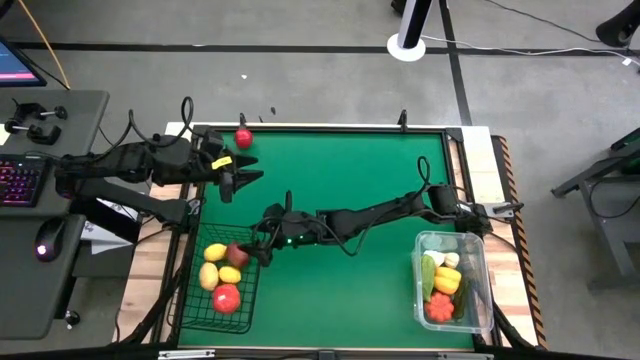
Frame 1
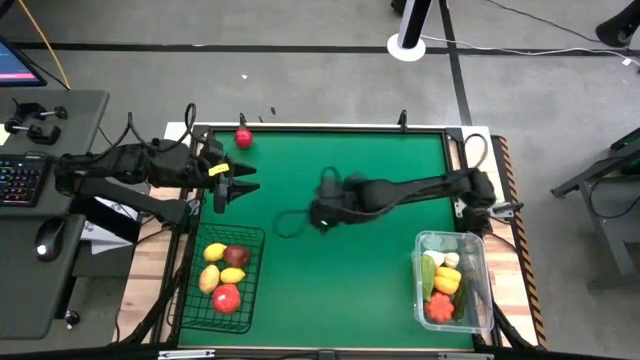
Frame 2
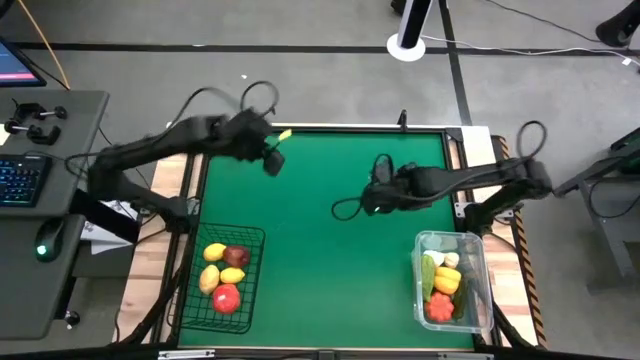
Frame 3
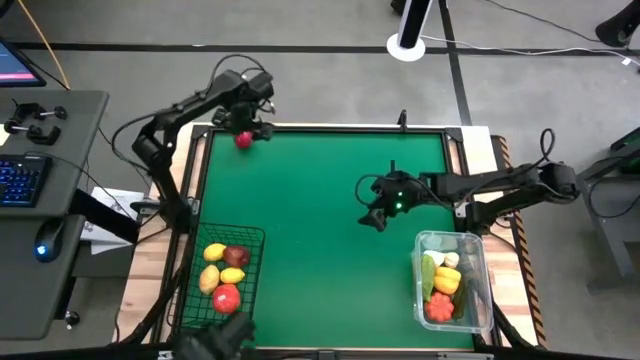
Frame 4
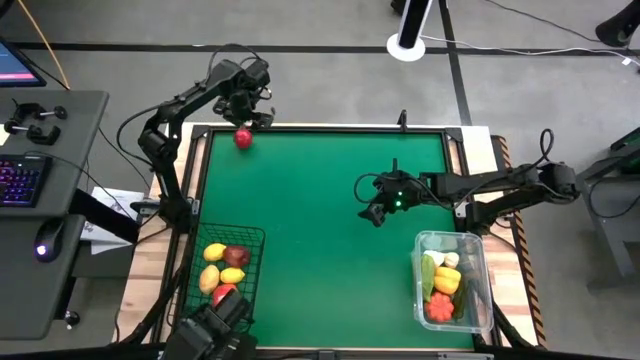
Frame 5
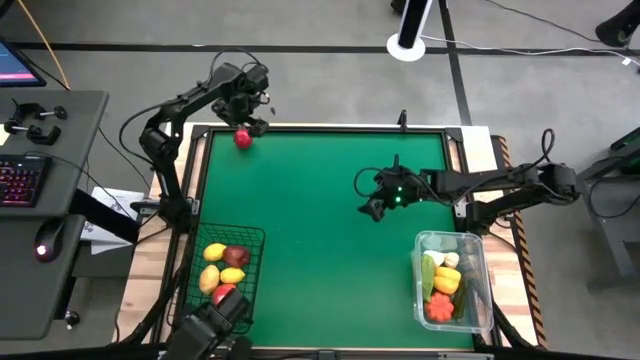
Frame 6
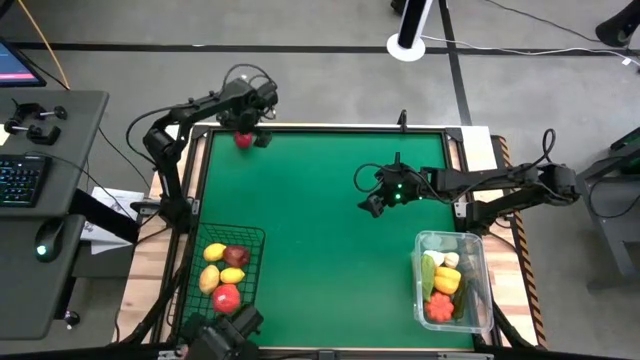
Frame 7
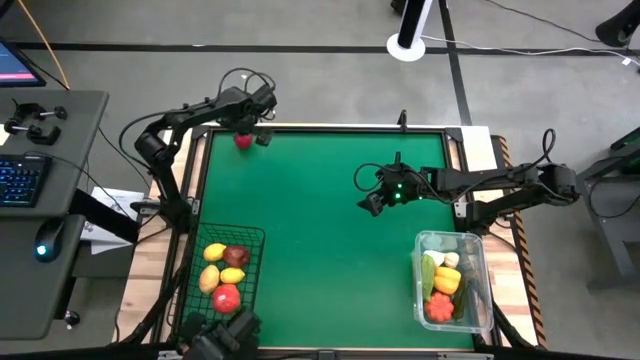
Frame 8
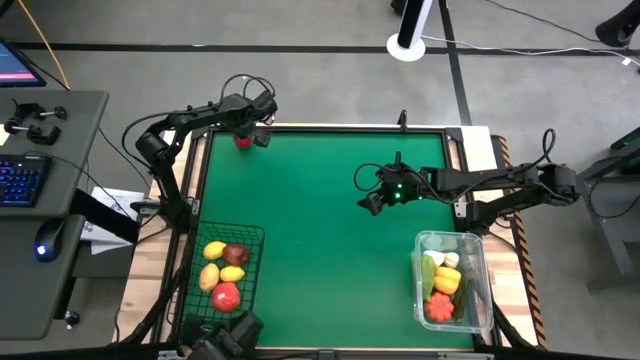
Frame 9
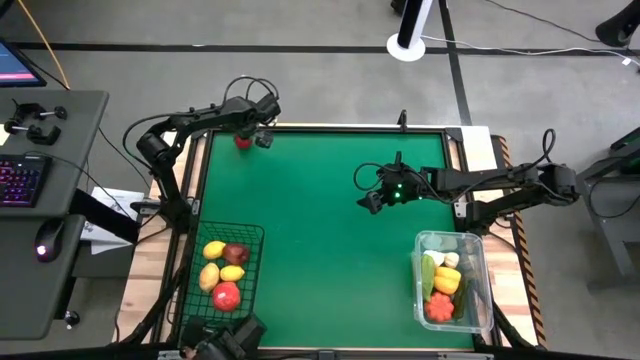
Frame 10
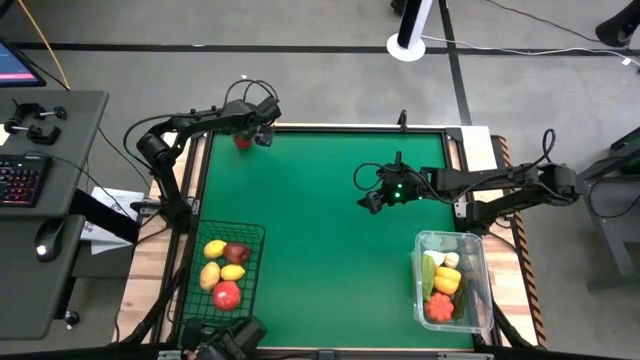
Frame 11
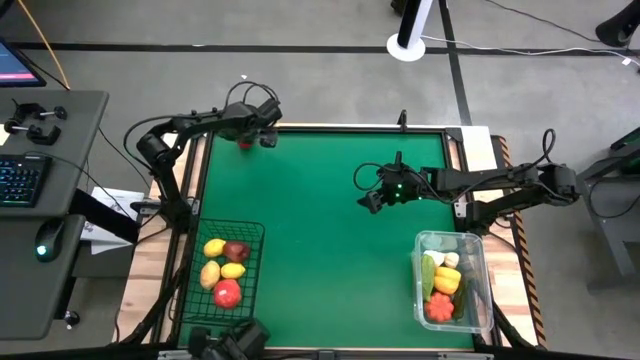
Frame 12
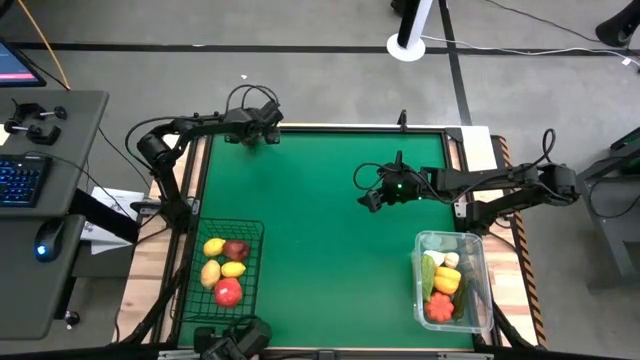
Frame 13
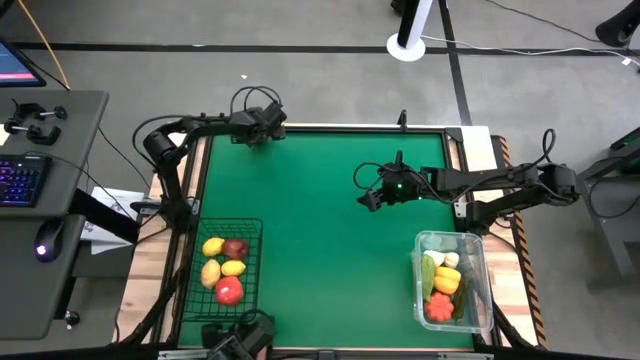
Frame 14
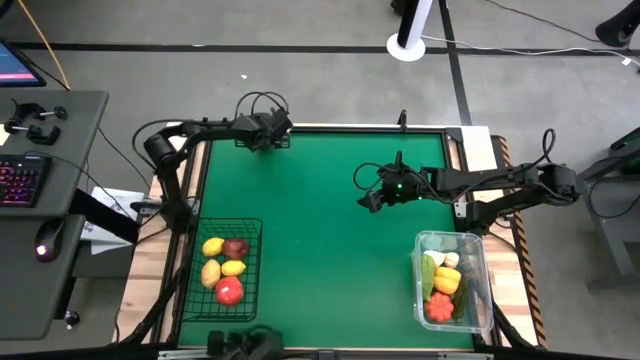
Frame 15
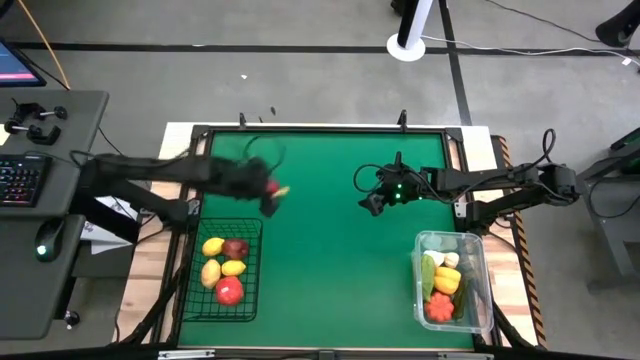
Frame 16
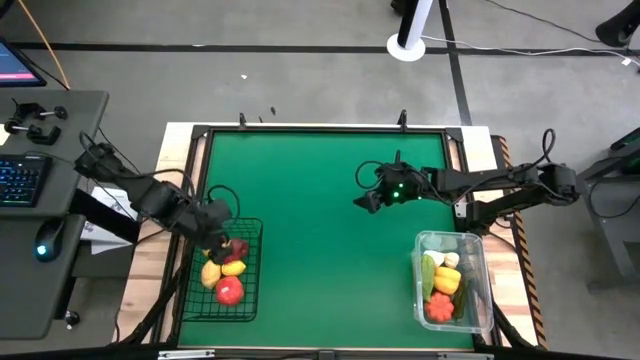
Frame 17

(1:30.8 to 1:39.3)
Task: Sort produce into baskets
Put the red tomato into the black wire basket

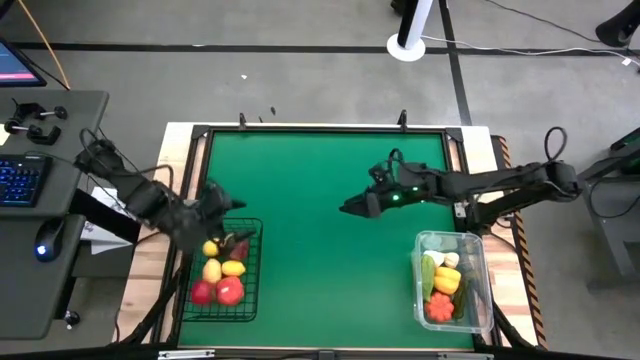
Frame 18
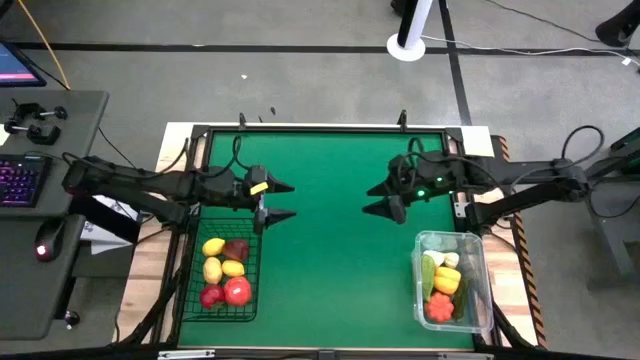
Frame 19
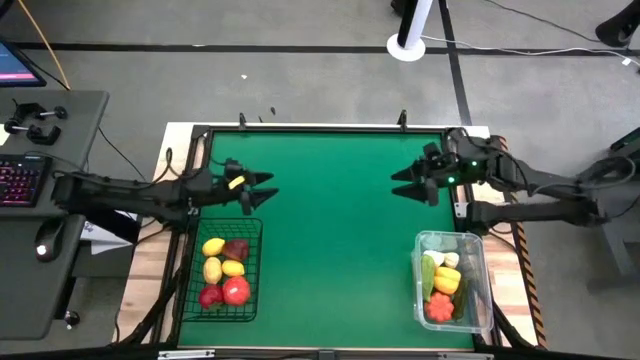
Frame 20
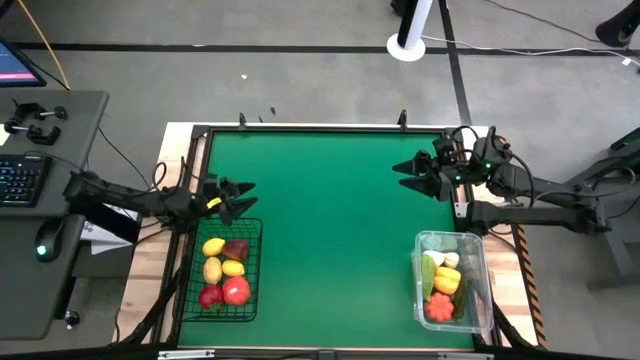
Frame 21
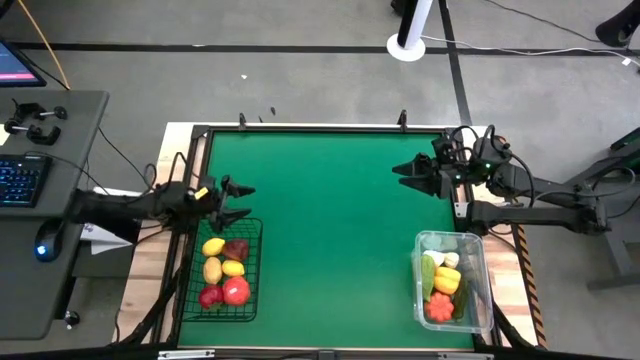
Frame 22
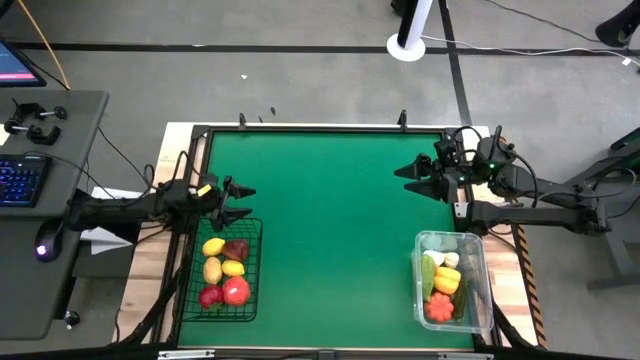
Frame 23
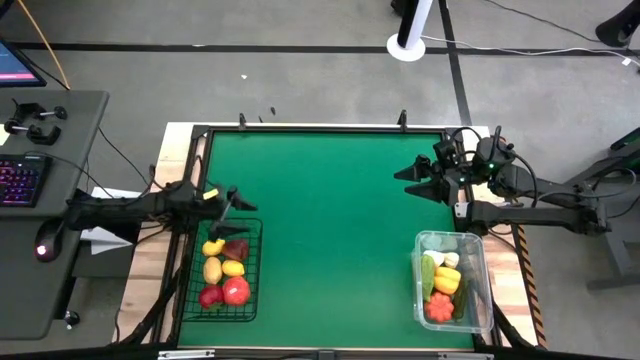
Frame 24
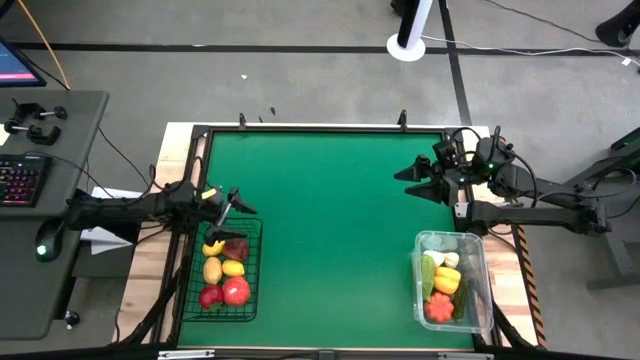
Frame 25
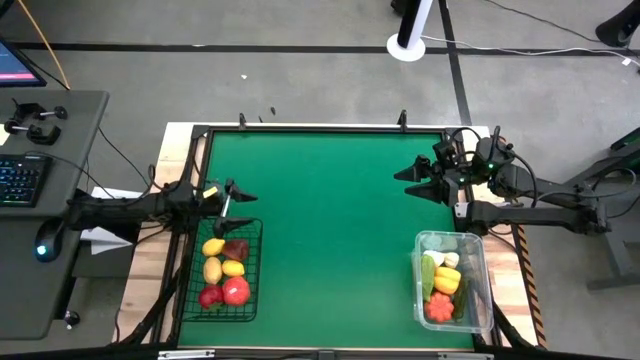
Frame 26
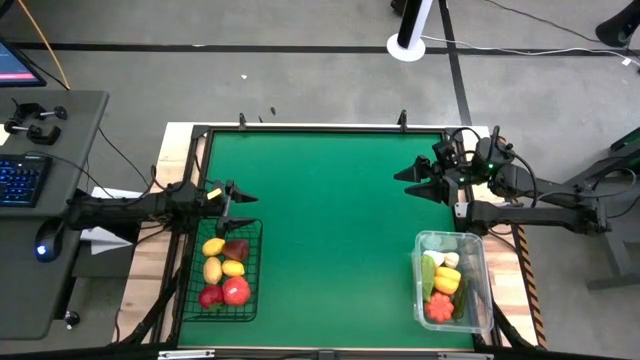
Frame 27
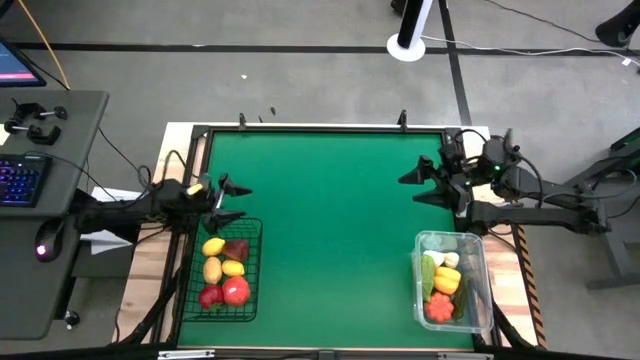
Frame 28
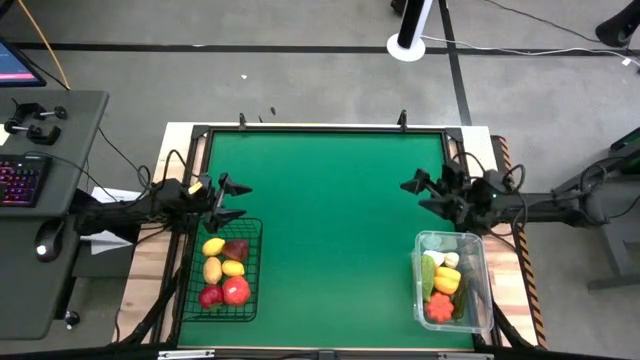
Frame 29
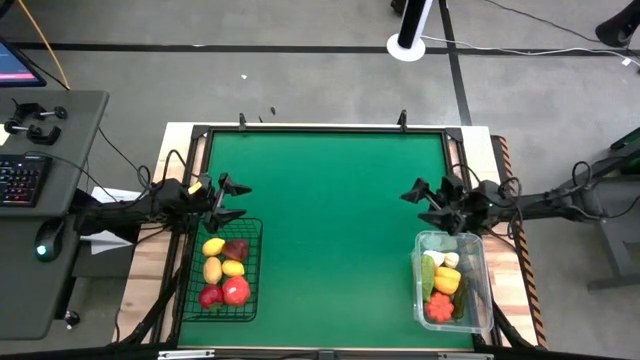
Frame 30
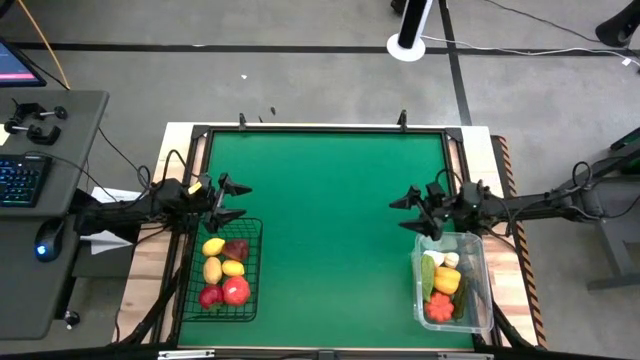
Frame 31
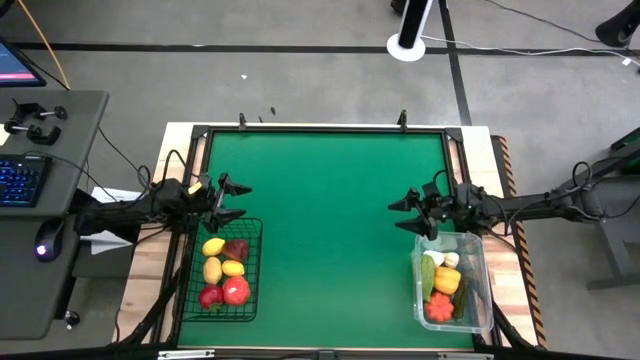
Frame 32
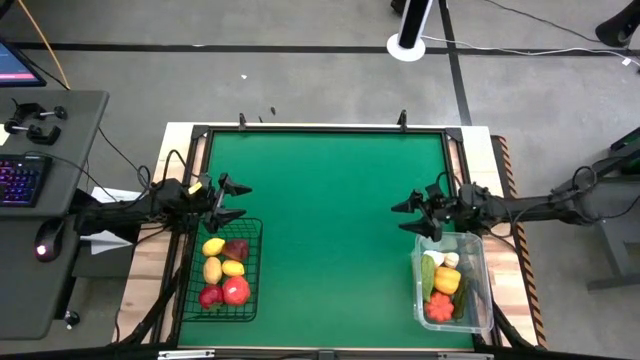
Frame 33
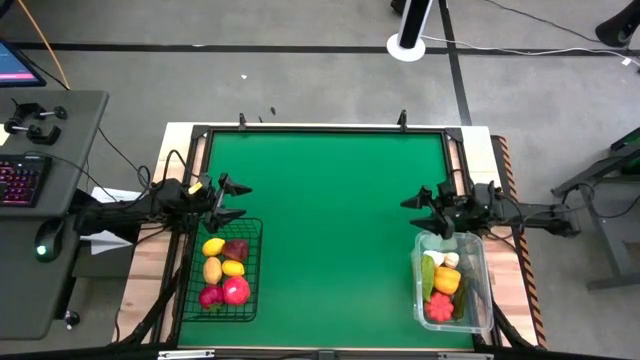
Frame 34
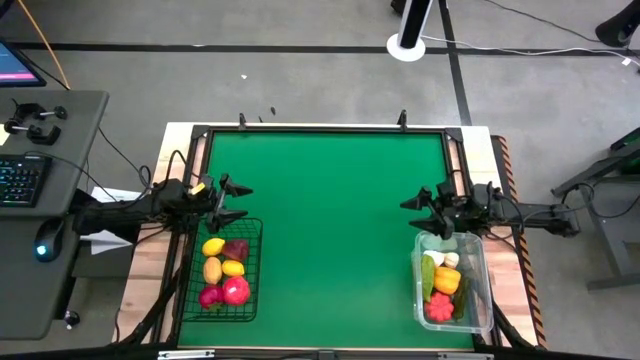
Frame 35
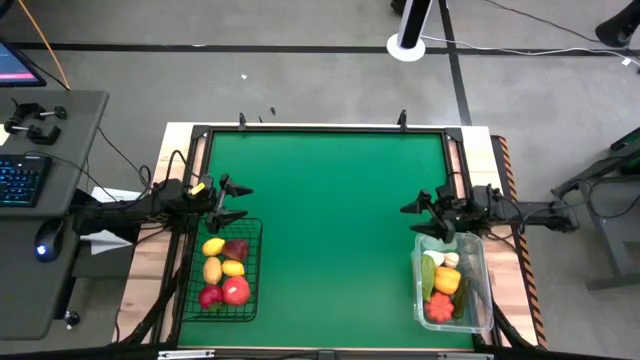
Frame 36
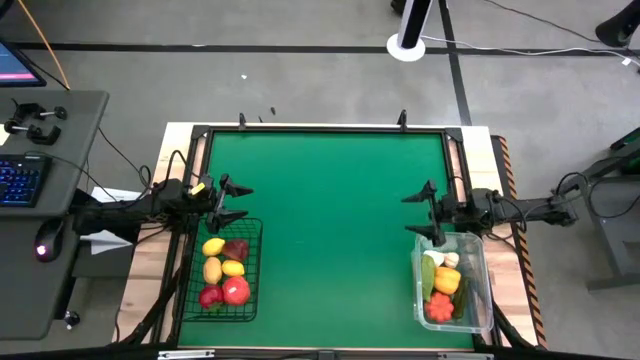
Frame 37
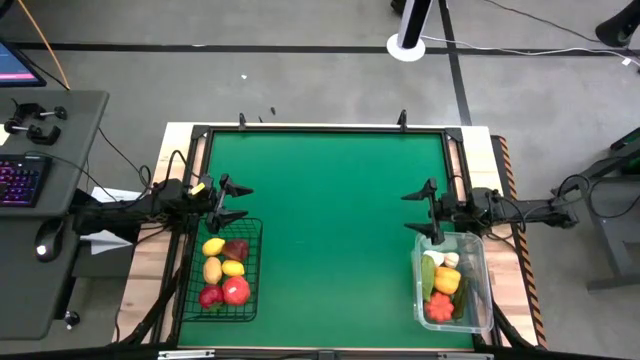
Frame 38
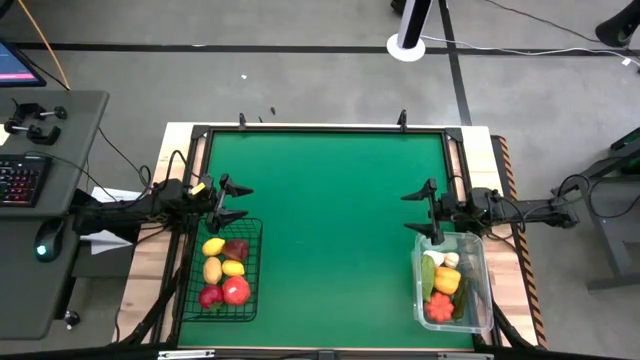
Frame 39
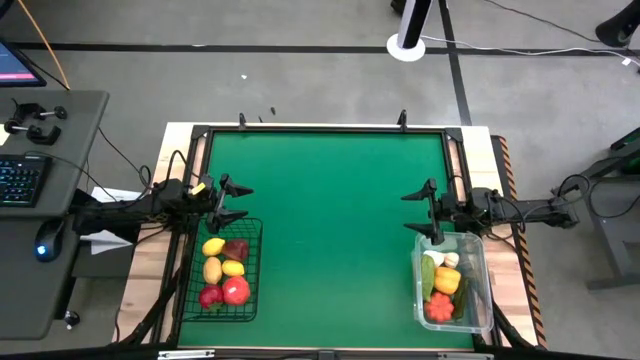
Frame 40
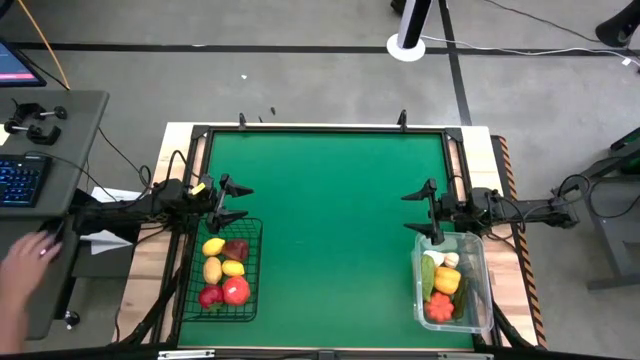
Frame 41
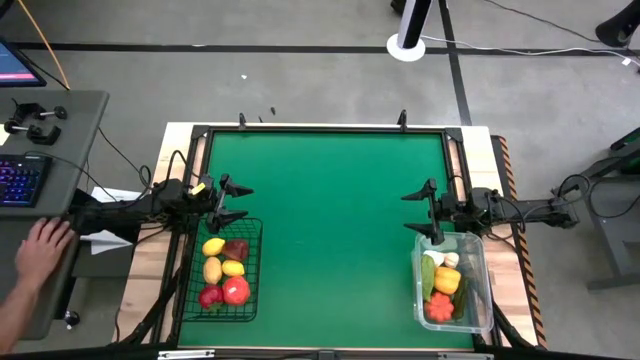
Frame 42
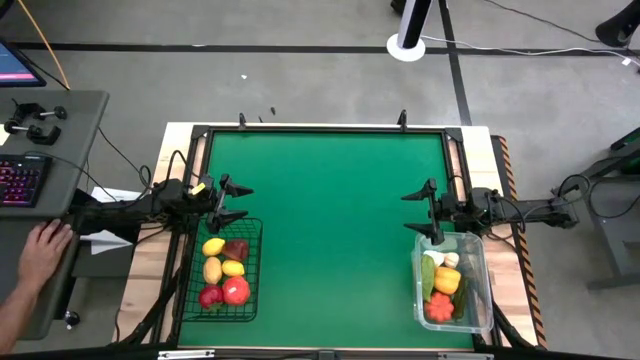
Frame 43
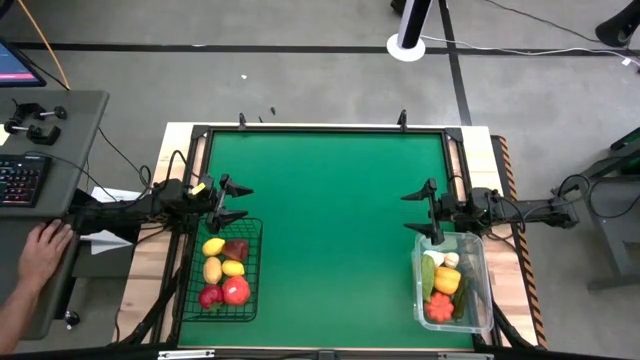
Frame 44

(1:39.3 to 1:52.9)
Return to Home Position
